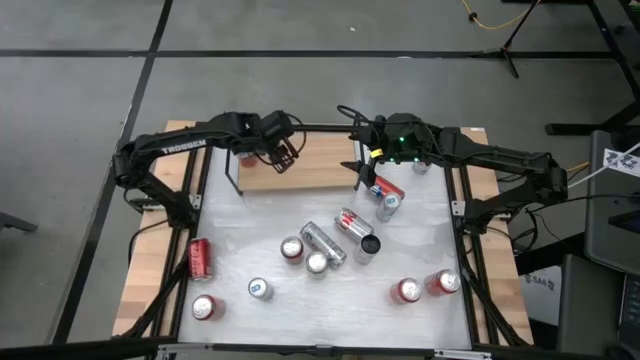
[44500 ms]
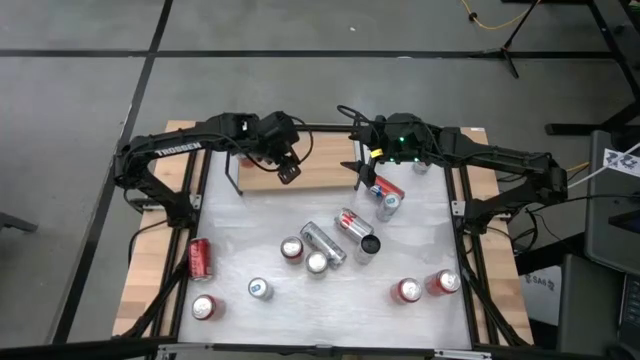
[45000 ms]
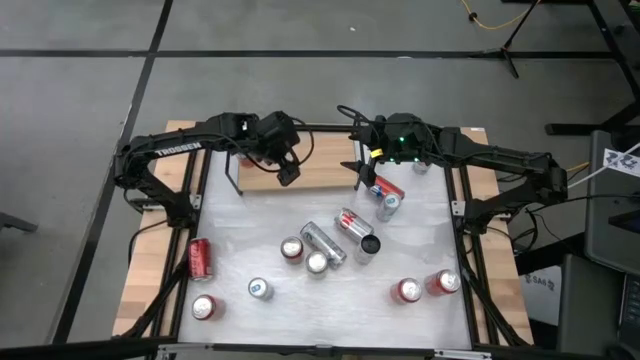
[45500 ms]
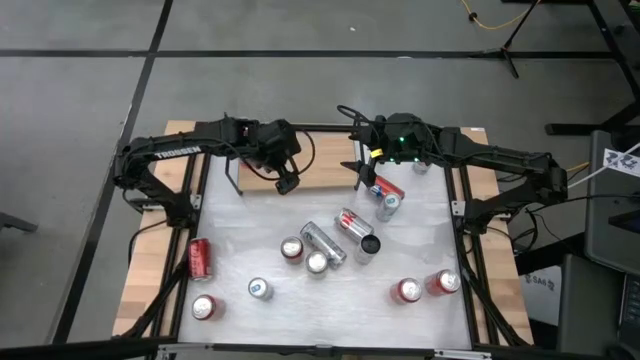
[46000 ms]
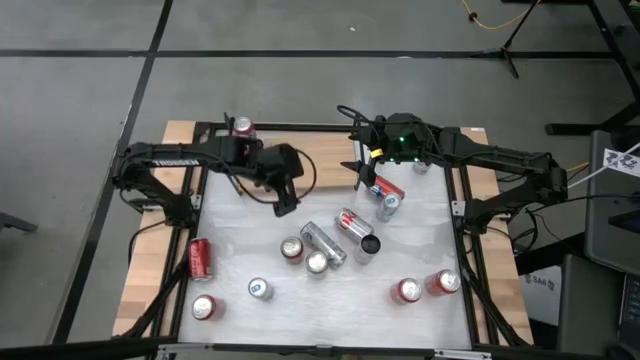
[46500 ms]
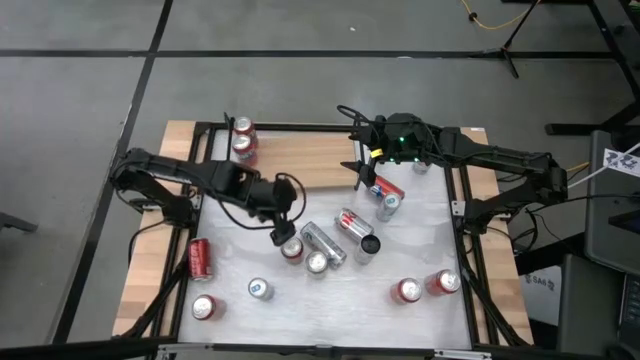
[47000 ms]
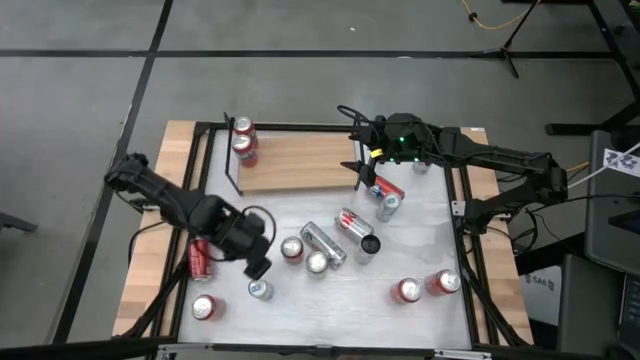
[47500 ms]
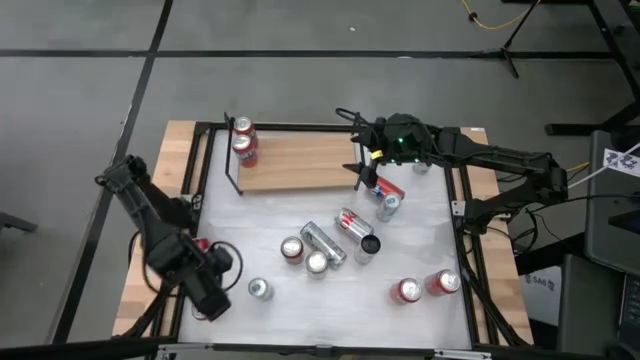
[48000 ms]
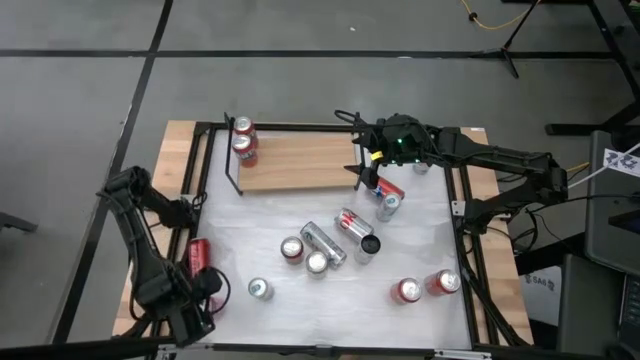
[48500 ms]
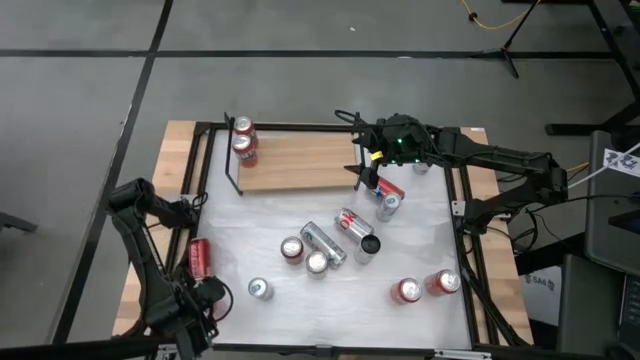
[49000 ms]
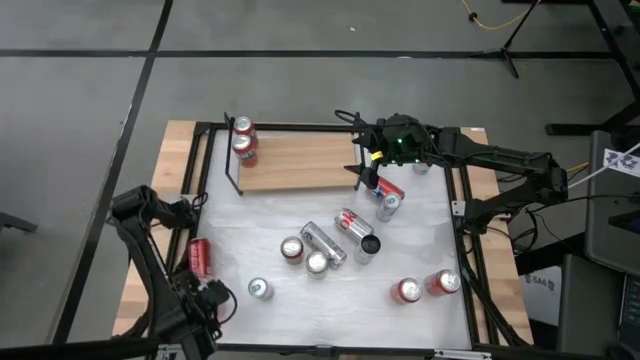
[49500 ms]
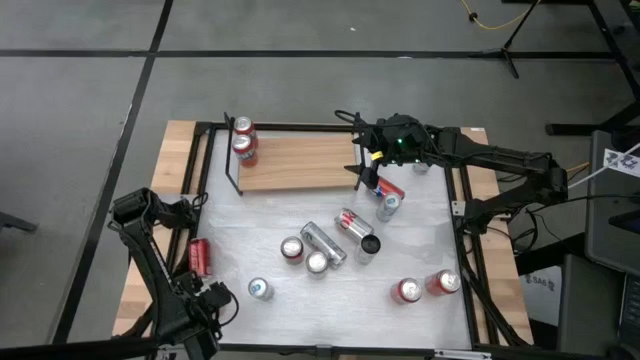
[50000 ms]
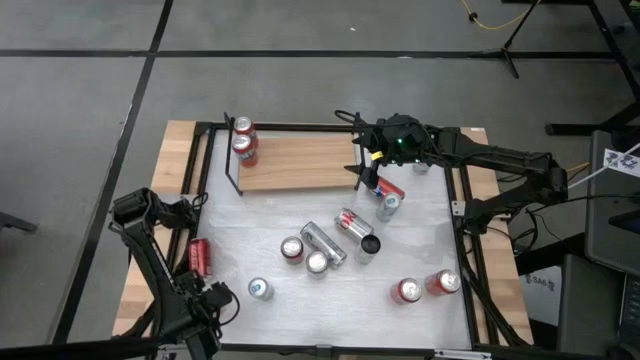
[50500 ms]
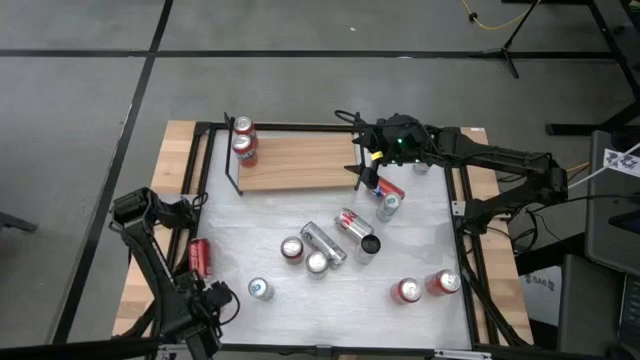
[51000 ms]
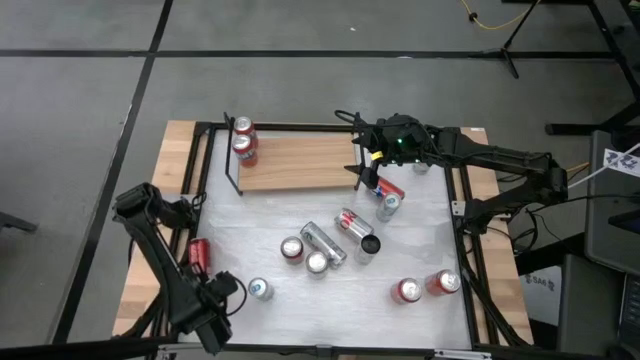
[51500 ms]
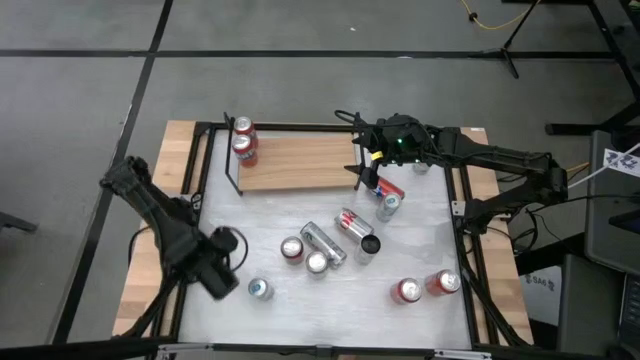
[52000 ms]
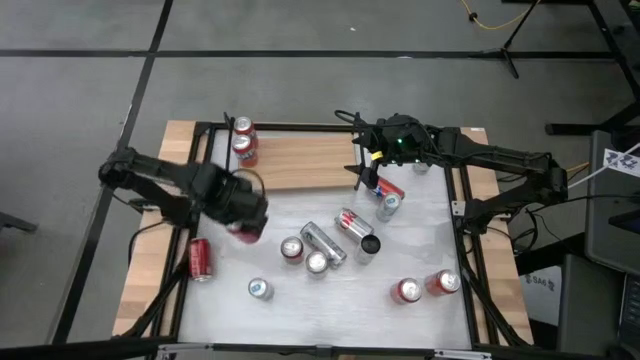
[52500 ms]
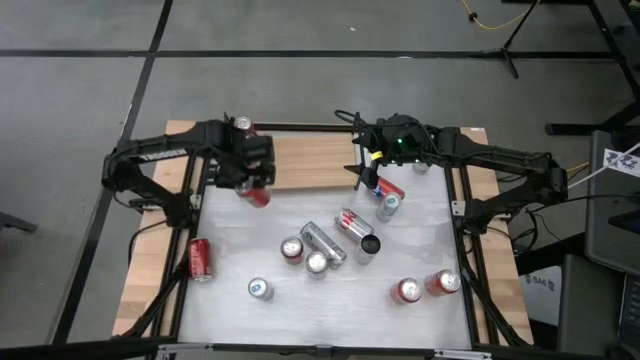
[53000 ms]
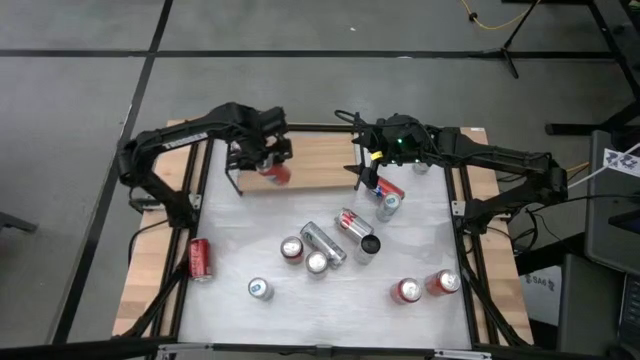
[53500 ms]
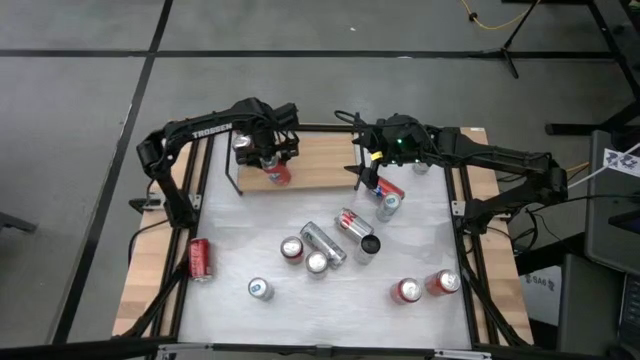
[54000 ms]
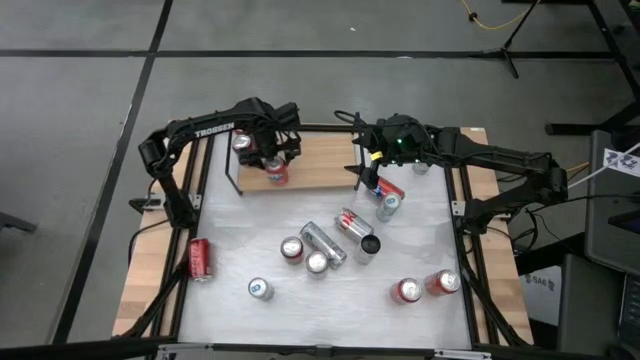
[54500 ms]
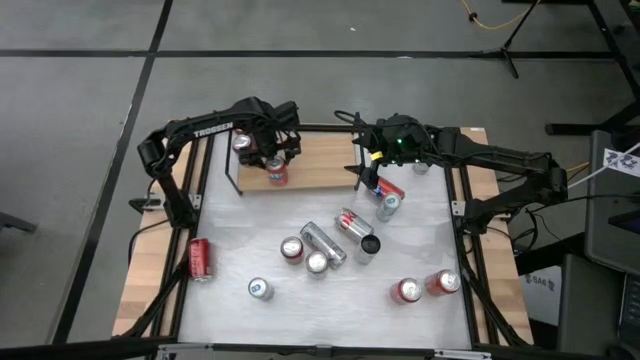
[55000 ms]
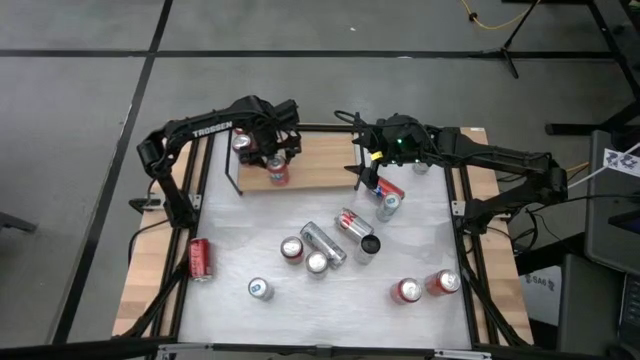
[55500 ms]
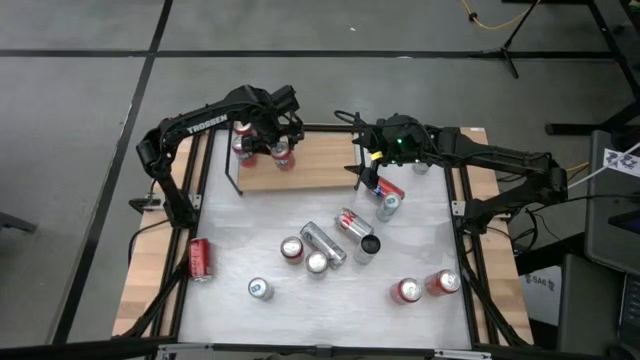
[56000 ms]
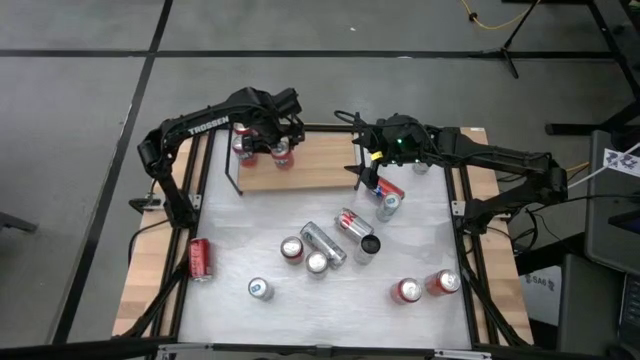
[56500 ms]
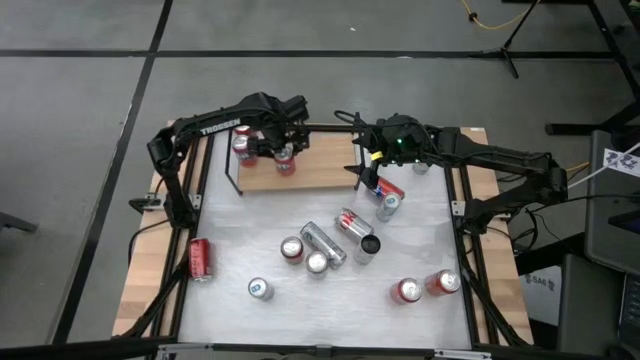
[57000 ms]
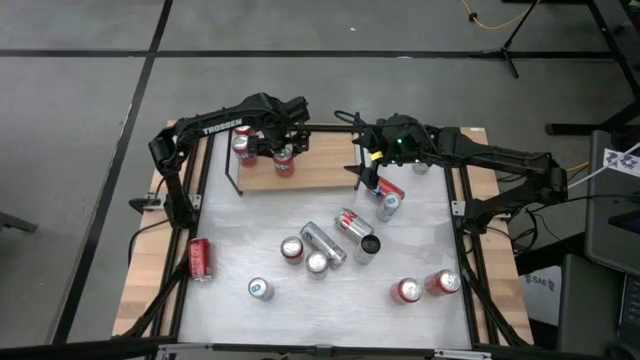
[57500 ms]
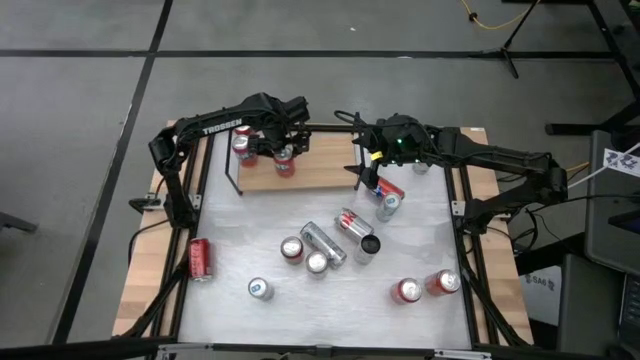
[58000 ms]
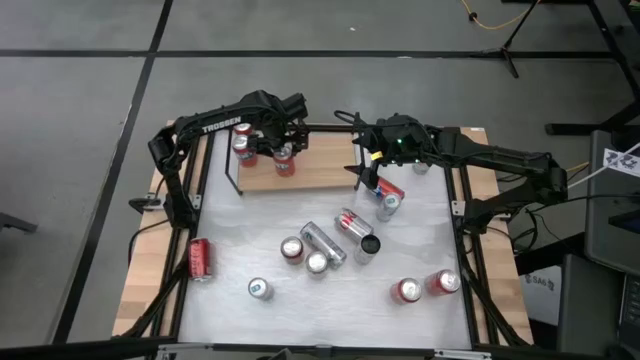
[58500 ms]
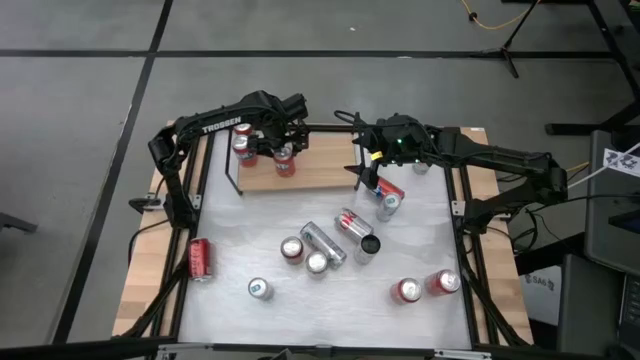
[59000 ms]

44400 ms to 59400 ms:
Task: Place canned beverage on shelf
Put the red soda can on the shelf aligned with the other red soda cans

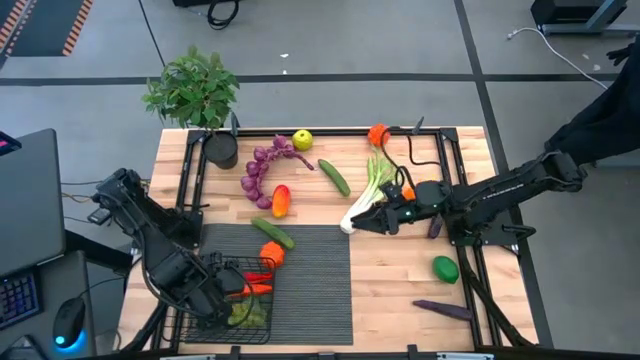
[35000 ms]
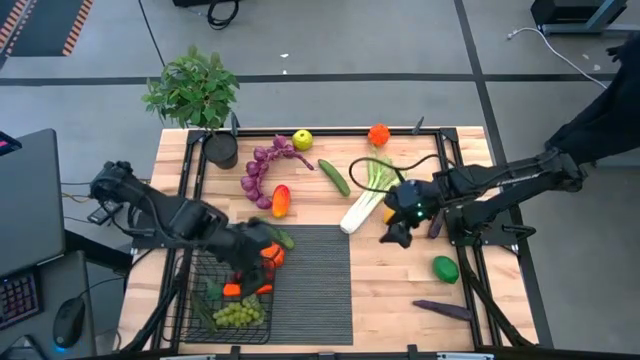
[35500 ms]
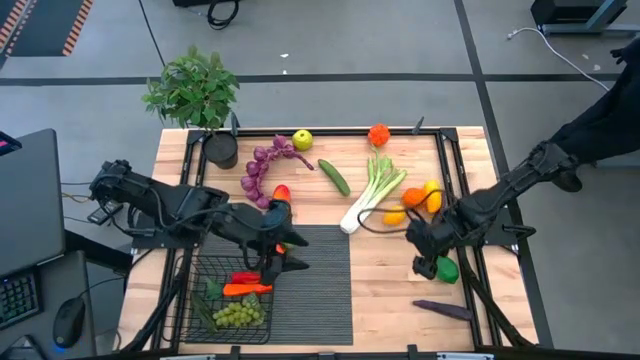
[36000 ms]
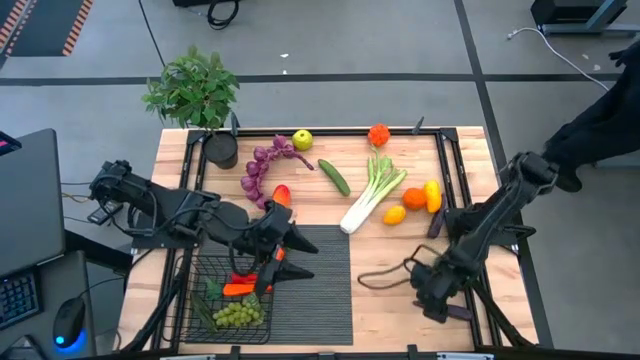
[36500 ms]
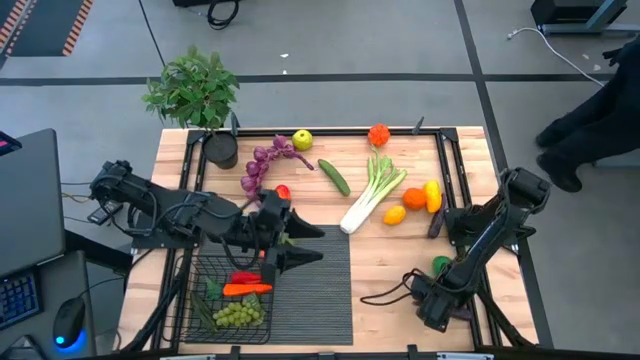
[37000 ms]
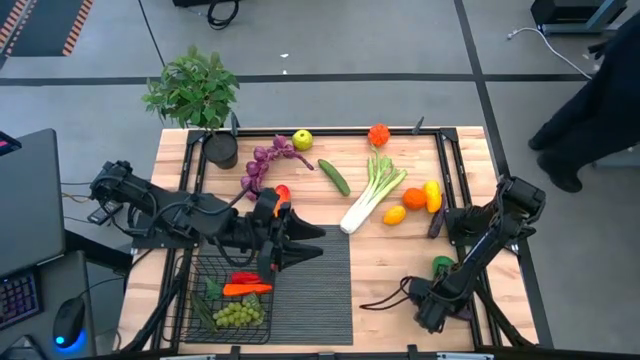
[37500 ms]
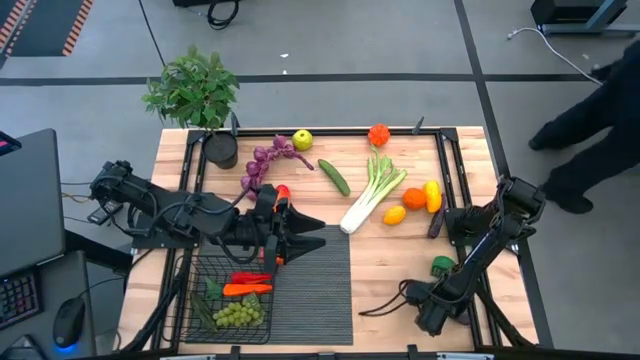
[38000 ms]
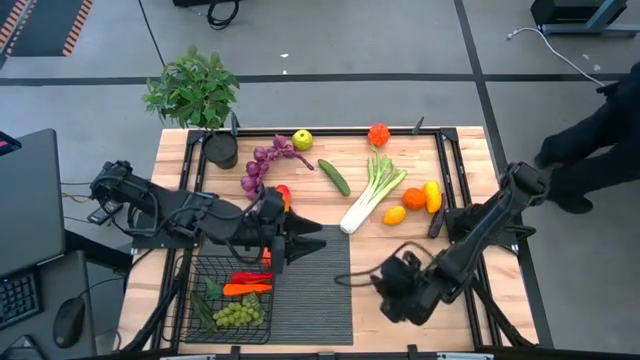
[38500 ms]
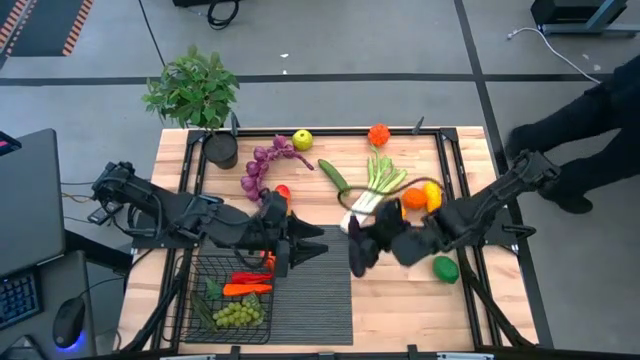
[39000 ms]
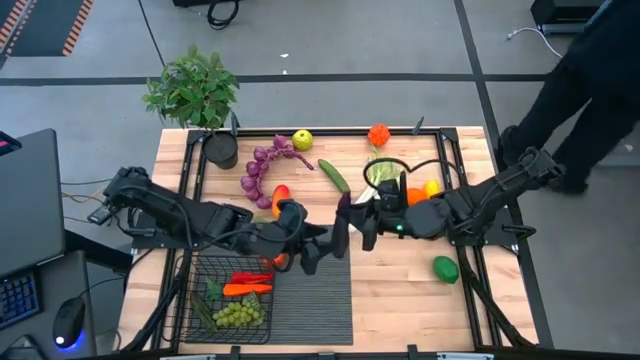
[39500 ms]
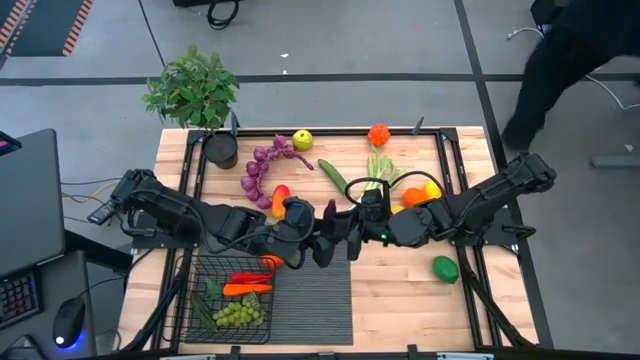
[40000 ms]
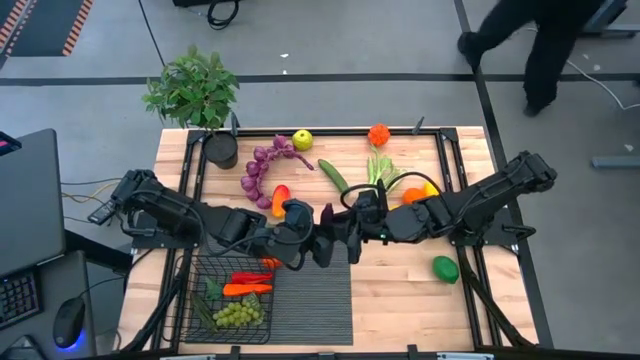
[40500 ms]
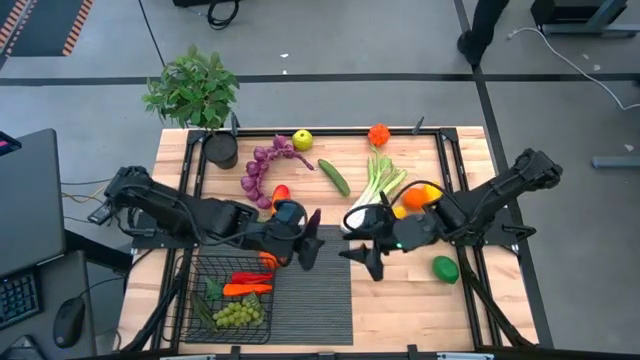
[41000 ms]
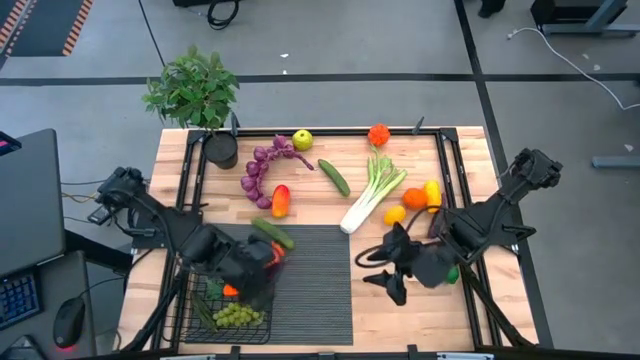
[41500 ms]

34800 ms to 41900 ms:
Task: Build produce basket
Put the bottom purple eggplant into the wire basket
